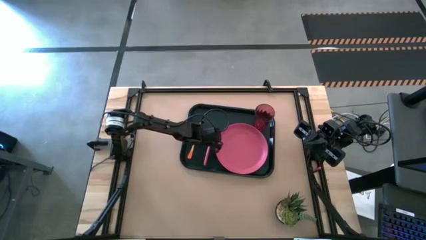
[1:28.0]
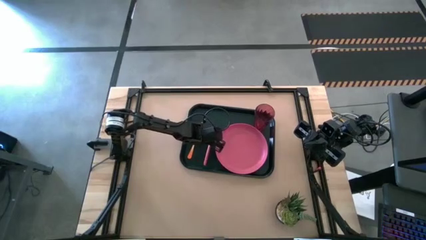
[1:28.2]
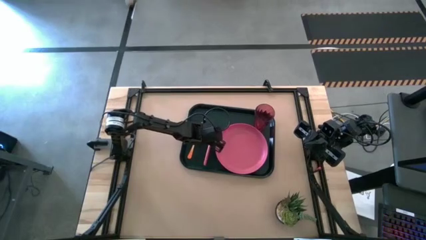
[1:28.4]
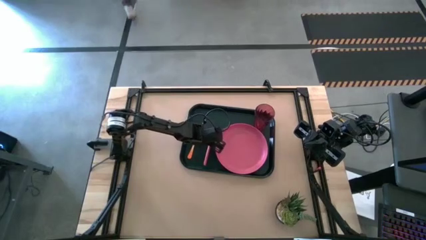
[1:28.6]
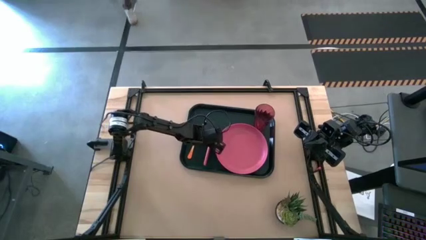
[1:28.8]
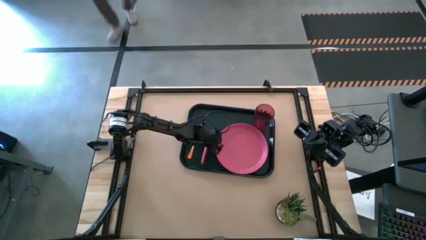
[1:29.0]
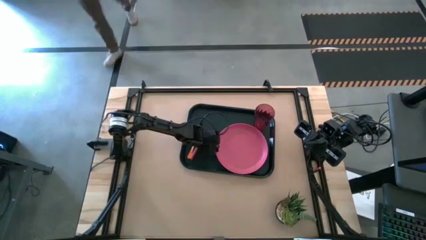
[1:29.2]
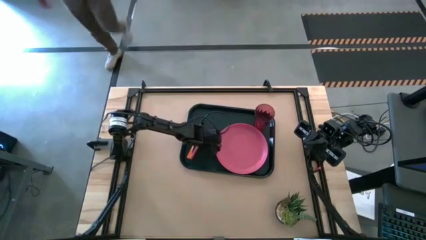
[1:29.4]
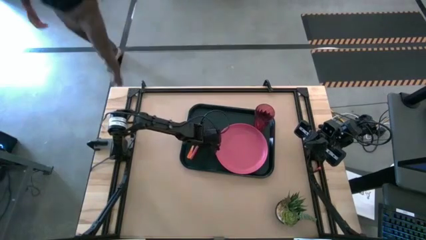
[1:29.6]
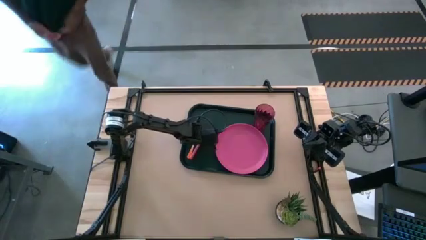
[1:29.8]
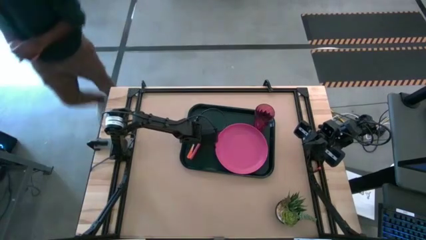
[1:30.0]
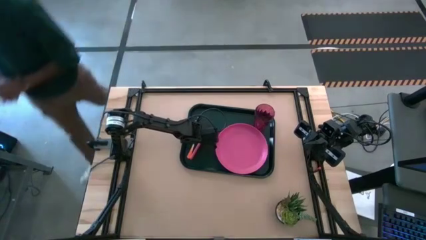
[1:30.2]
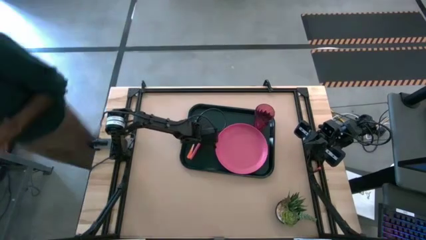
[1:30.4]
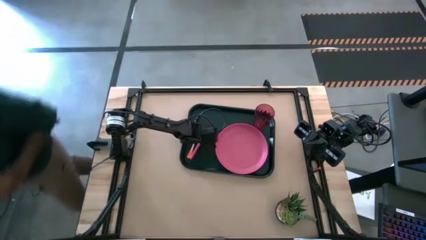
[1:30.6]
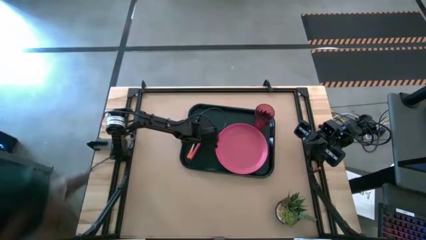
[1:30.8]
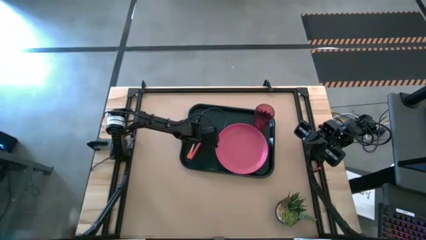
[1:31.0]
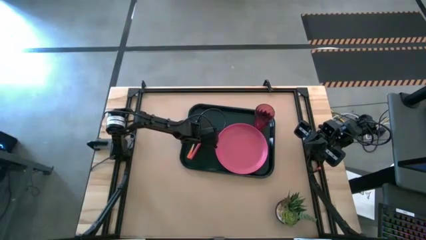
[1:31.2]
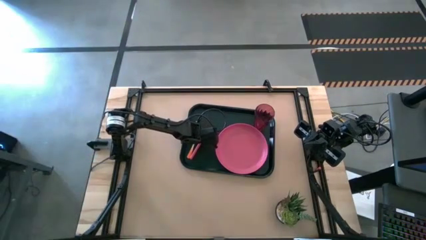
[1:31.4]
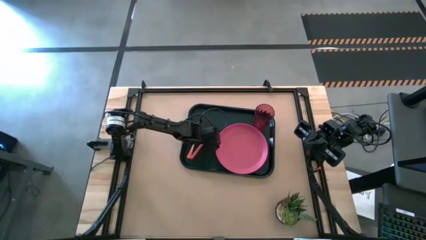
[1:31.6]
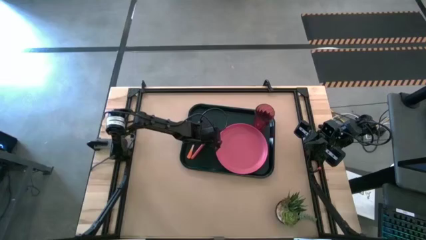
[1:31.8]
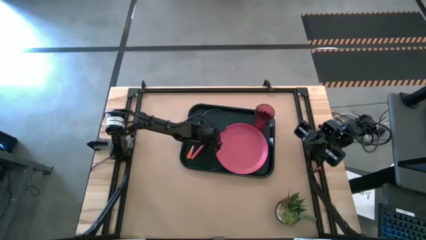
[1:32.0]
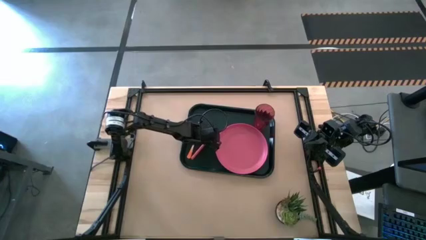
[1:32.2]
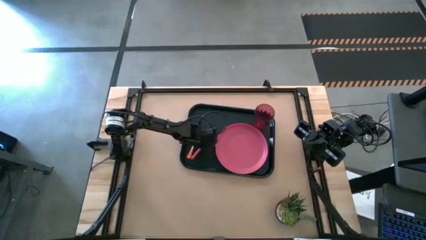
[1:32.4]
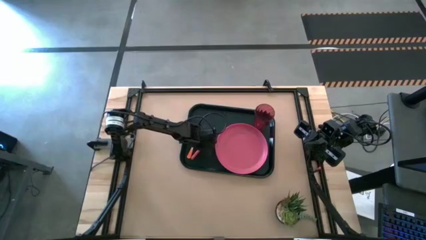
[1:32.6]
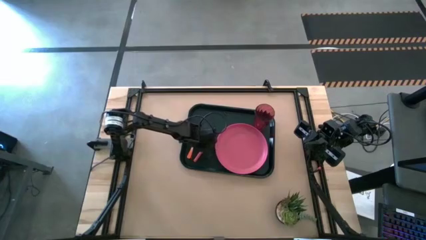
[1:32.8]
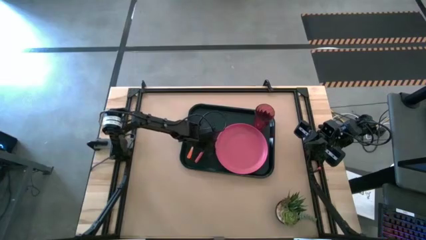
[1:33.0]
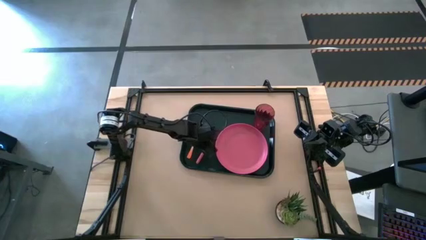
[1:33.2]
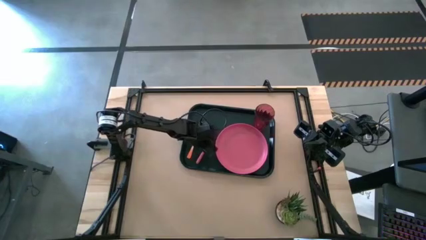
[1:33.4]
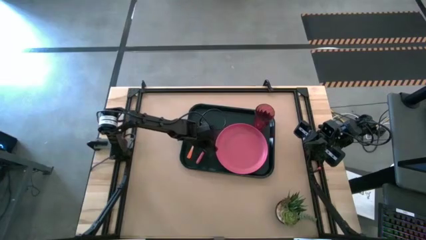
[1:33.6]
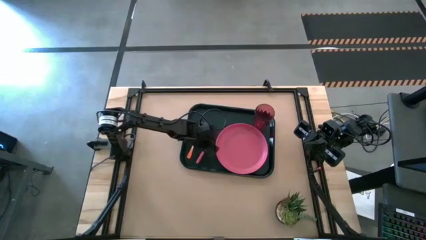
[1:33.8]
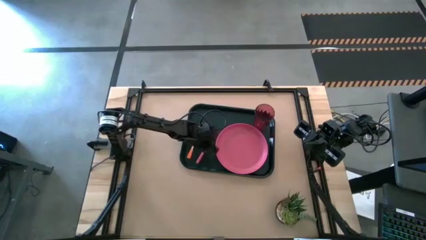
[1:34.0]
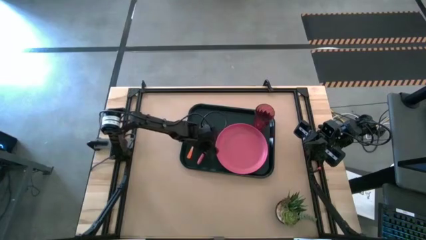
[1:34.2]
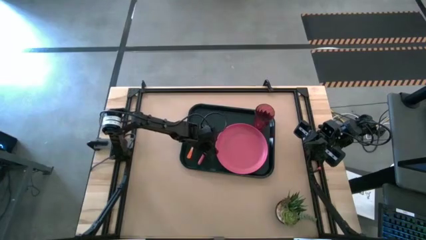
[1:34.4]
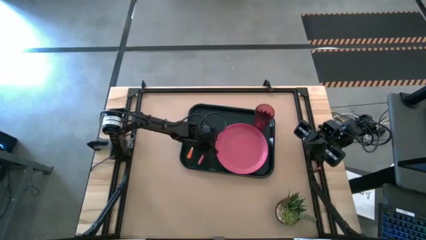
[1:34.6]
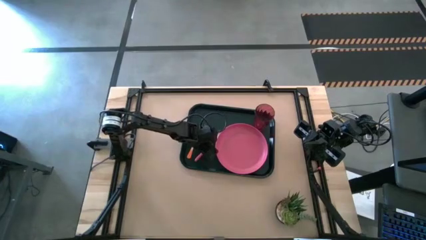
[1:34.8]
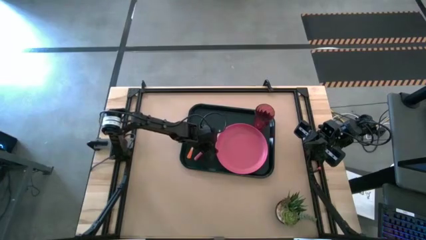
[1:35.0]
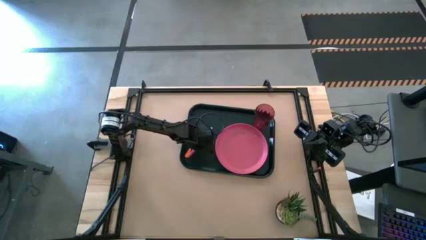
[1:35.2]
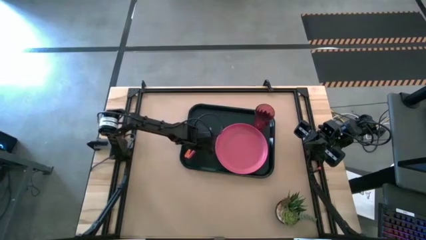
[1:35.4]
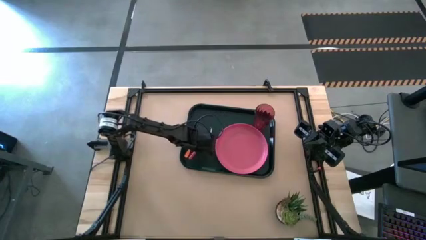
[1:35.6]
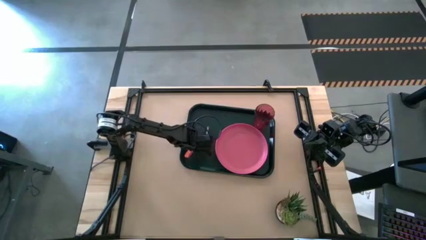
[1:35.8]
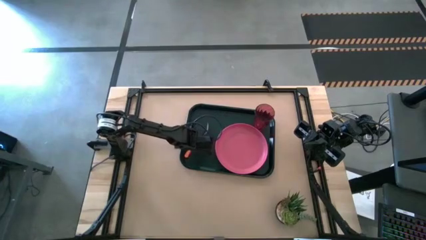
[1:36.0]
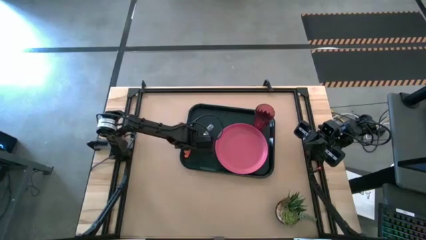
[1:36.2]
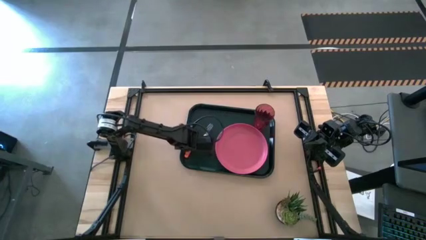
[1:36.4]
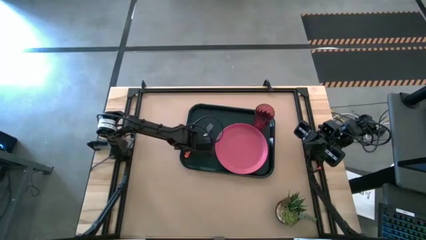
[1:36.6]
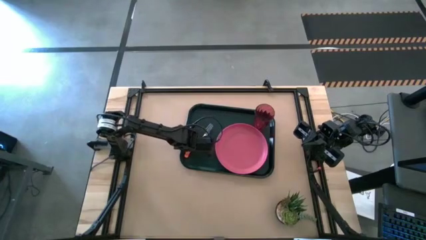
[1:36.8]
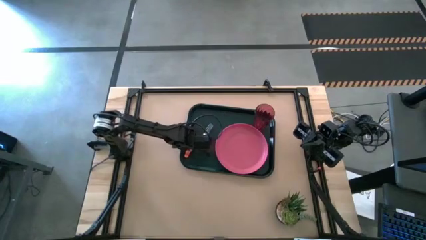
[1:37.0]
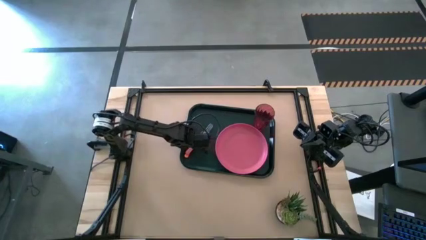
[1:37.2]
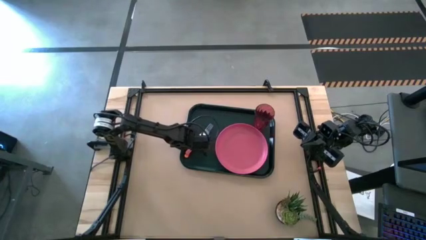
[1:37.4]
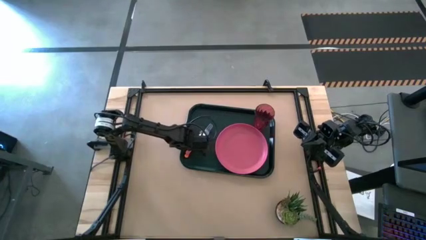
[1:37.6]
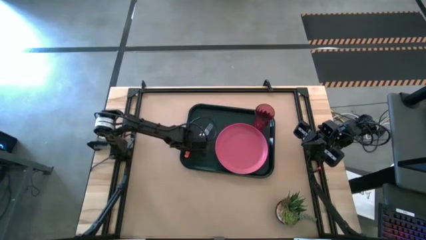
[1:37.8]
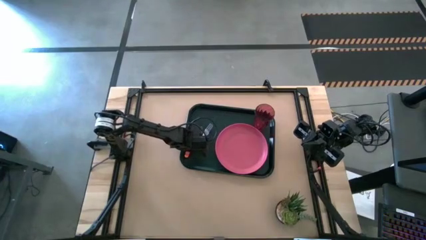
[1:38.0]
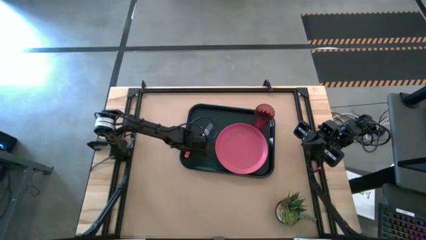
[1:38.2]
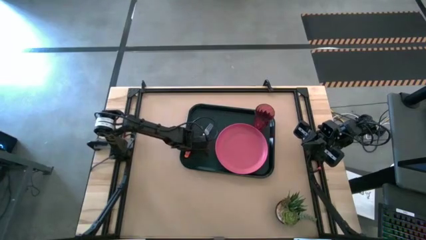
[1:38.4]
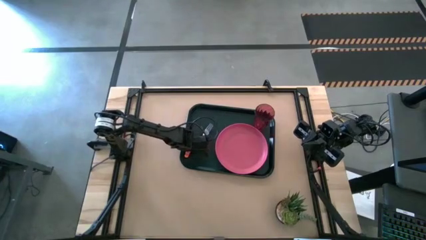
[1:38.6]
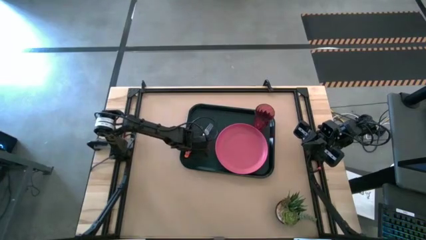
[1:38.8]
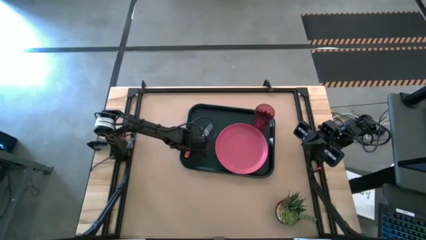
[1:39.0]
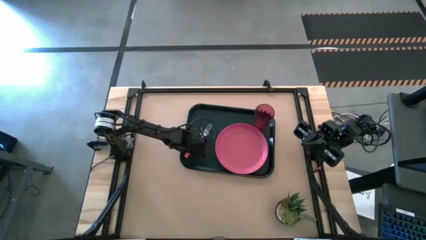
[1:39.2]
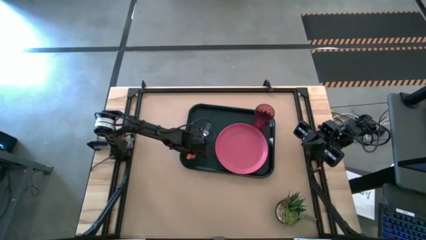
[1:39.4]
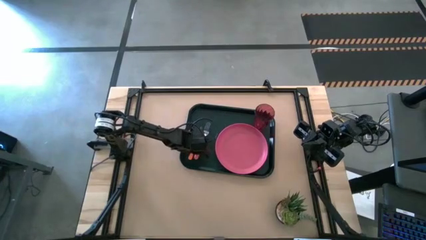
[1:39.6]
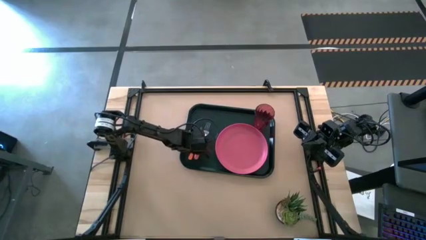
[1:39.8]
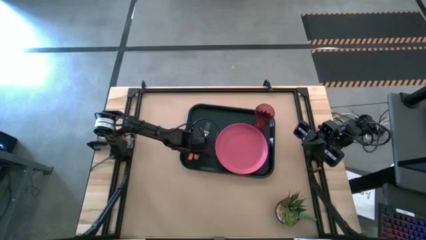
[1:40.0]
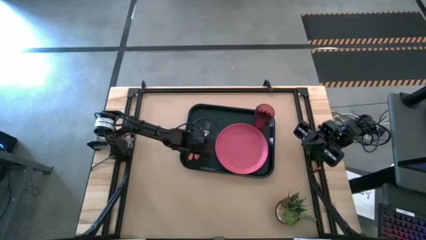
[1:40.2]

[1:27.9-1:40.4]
Task: Pick and place plate/cup/fork/spoon on tray
Adjust the pink fork on the black serving tray

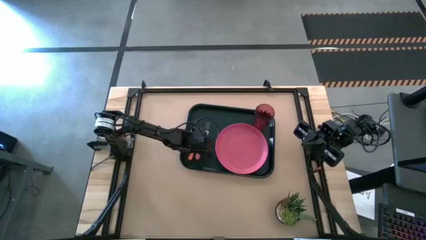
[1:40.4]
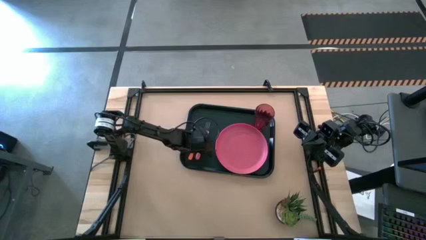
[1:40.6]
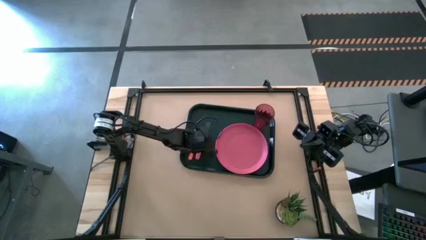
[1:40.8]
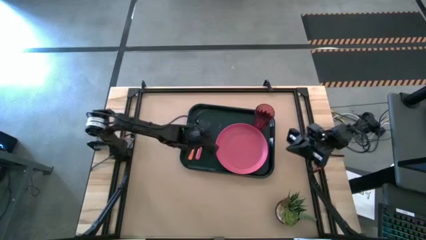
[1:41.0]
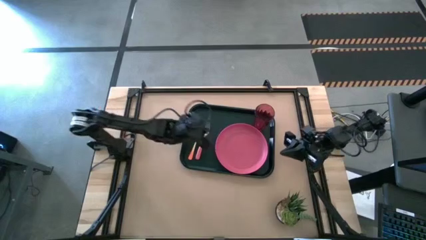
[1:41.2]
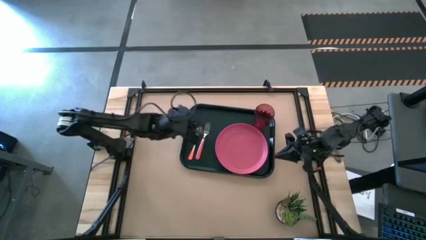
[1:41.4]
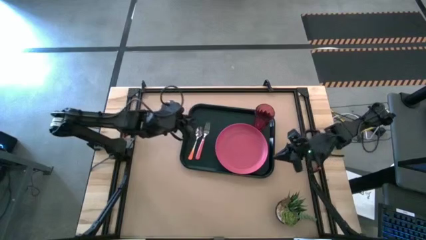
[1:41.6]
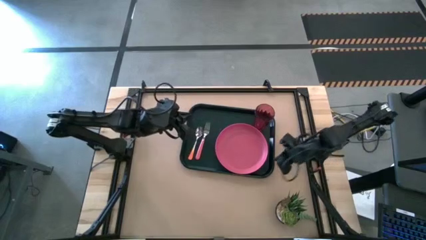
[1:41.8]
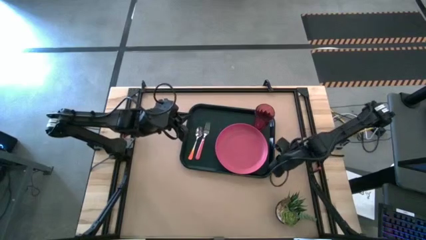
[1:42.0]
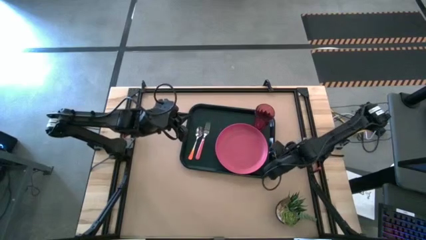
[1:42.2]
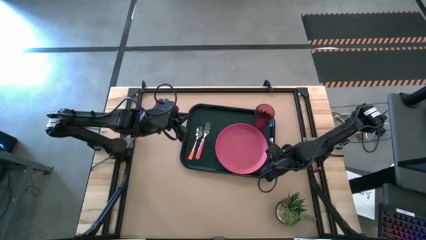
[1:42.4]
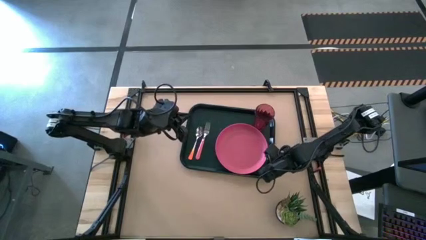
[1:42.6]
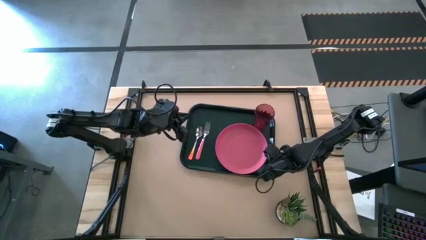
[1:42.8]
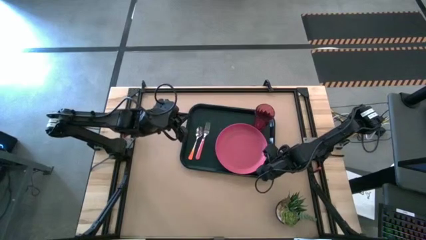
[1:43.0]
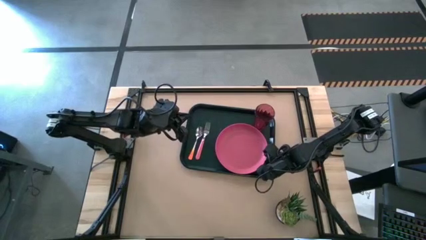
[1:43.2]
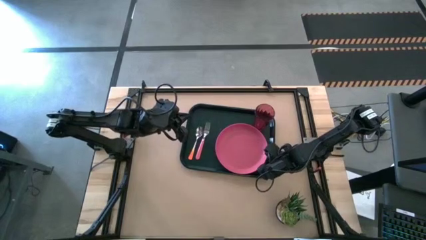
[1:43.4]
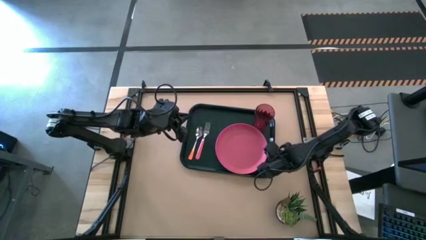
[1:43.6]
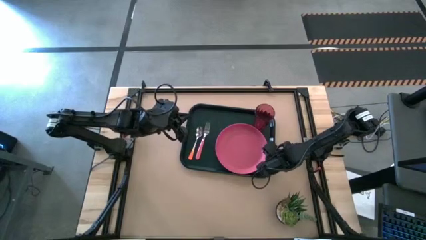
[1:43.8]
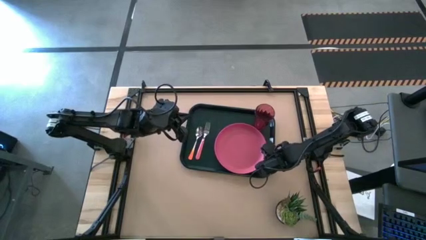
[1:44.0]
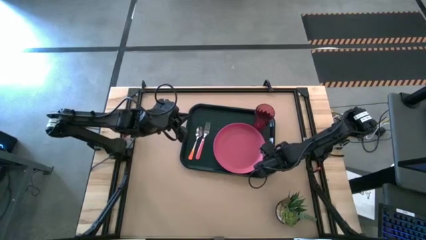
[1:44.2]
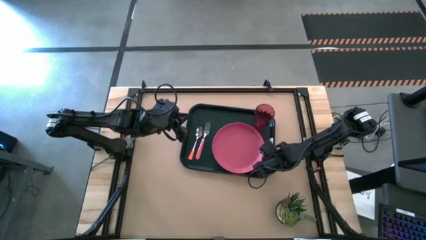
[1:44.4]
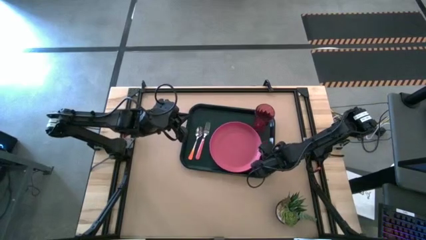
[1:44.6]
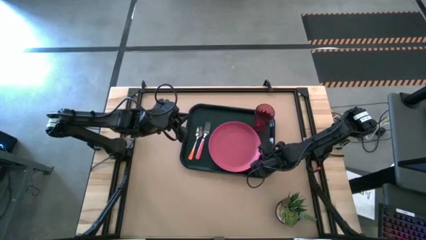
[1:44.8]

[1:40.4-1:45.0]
Adjust the pink plate on the black serving tray
